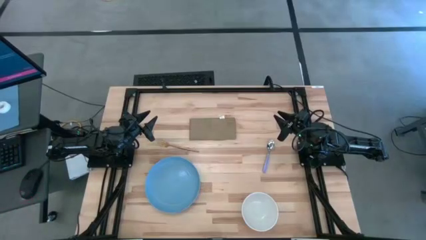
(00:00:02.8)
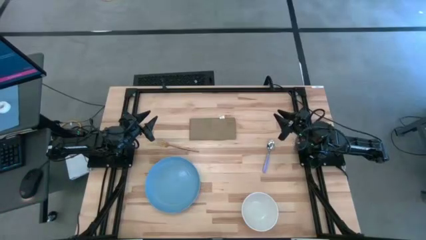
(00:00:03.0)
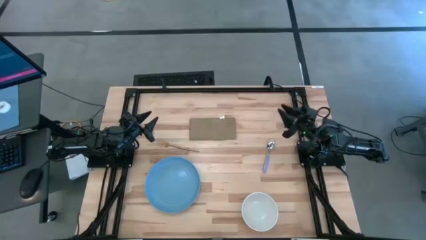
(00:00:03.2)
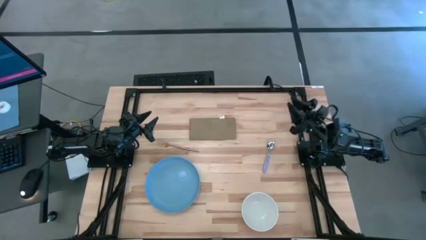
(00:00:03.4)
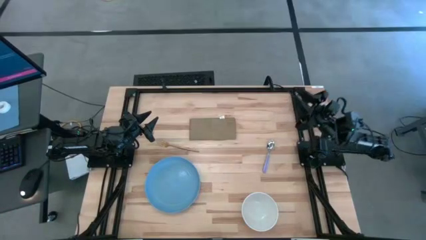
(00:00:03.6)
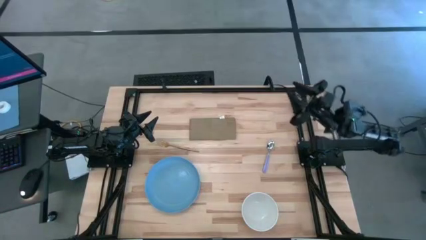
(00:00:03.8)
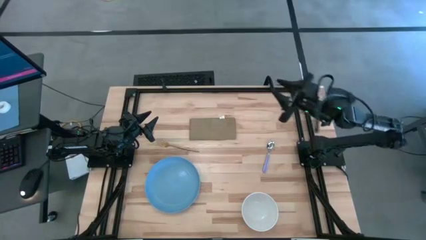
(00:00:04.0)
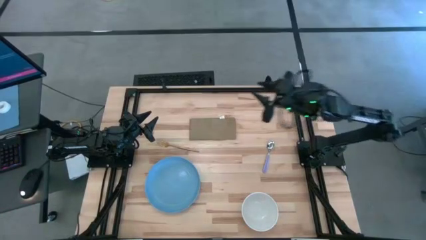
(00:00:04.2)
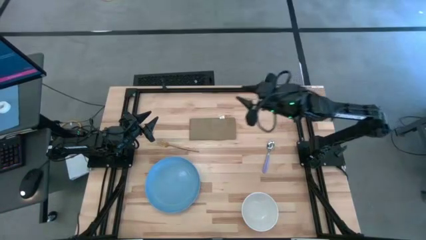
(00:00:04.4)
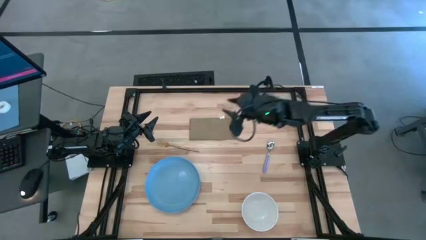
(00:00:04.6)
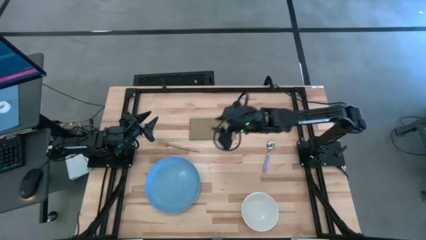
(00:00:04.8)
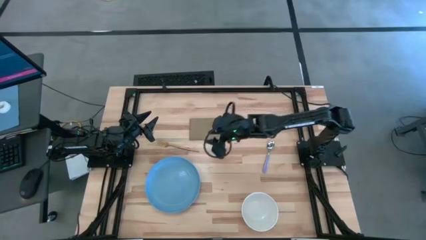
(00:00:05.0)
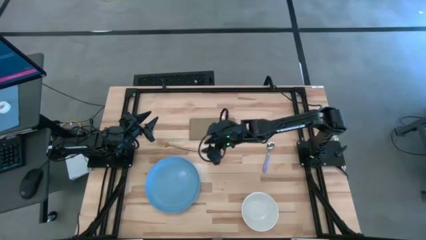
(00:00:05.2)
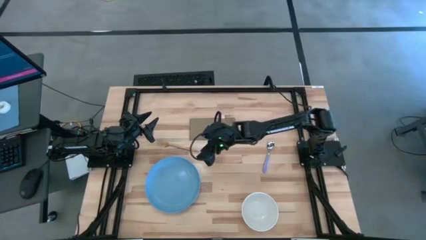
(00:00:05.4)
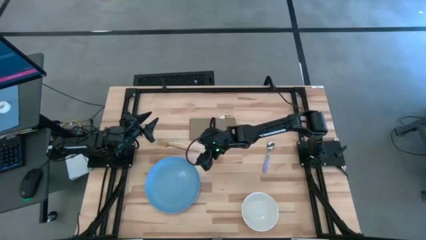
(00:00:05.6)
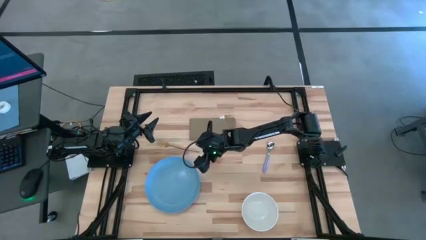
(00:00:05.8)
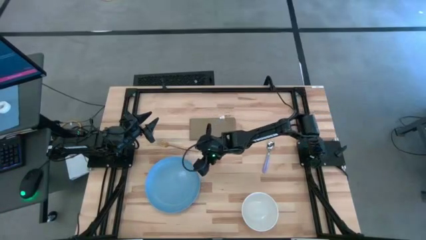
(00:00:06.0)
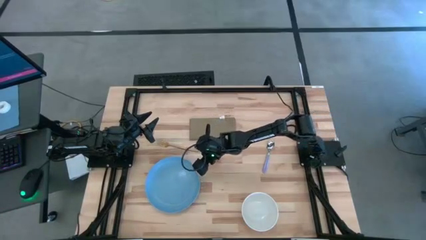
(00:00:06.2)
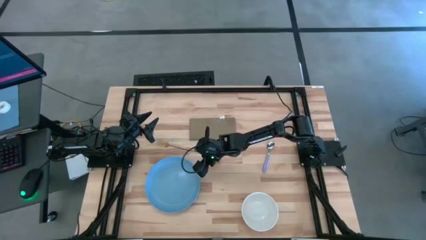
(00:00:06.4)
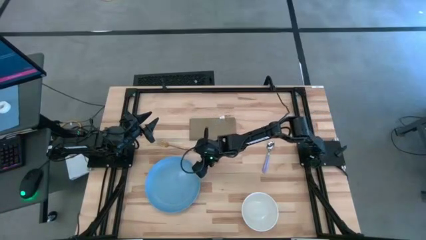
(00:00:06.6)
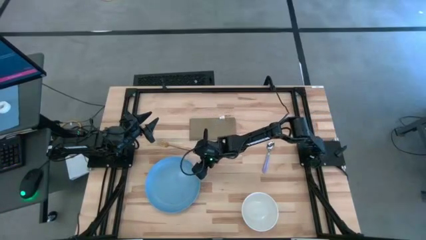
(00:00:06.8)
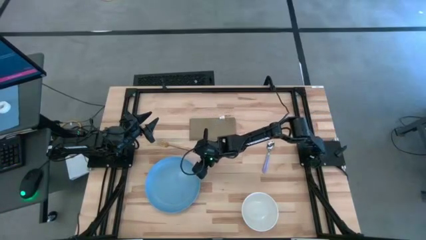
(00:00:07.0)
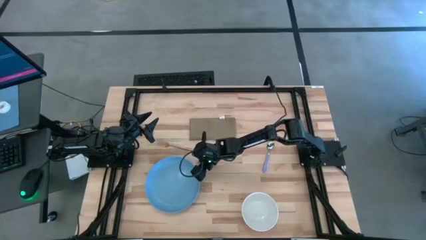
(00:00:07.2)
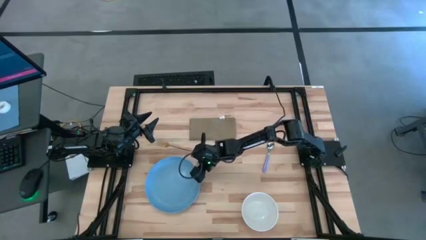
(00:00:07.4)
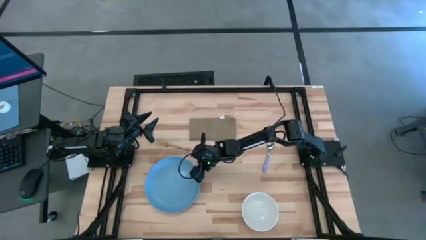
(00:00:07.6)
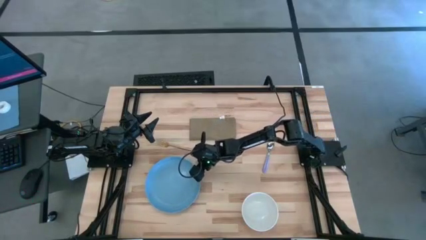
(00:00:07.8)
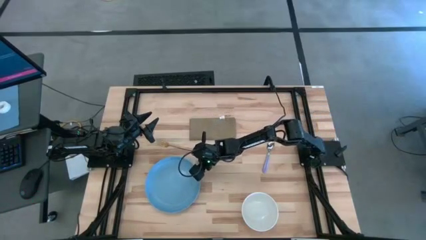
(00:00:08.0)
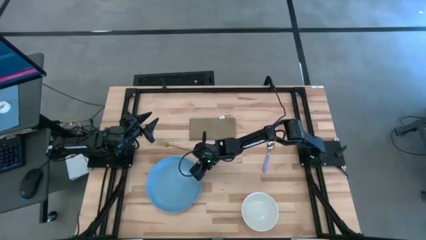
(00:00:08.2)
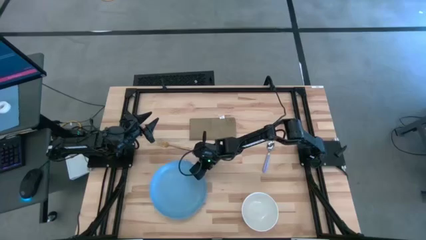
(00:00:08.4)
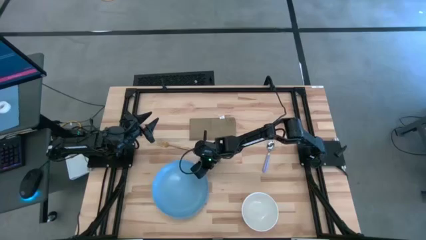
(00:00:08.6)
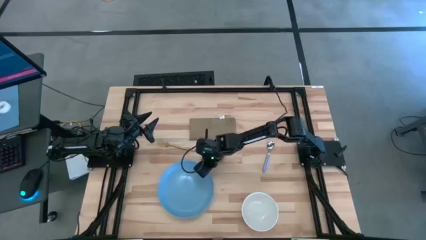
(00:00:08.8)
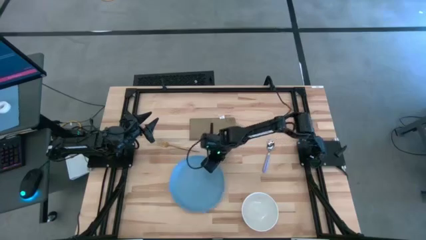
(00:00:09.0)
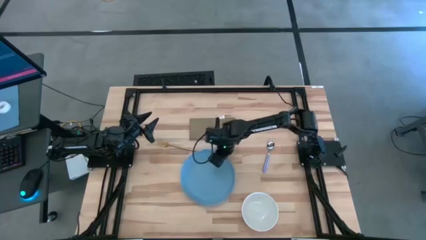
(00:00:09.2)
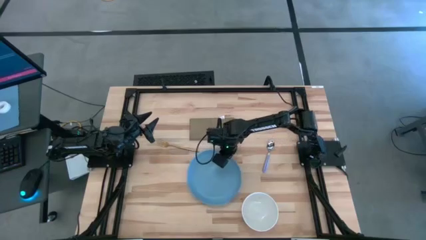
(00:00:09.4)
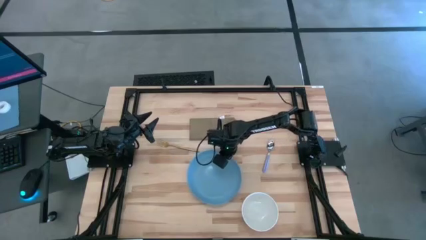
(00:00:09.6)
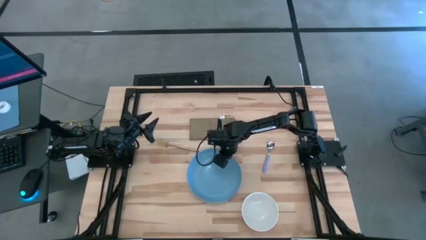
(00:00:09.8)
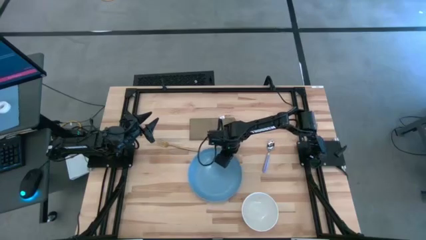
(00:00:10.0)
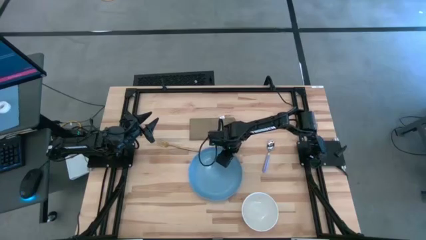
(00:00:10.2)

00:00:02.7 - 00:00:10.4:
Task: Set table place
Move the blue plate to the center of the table

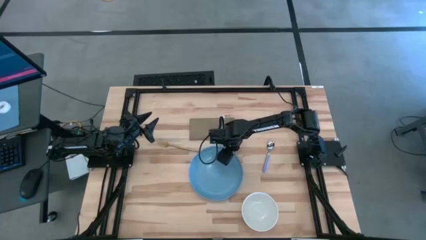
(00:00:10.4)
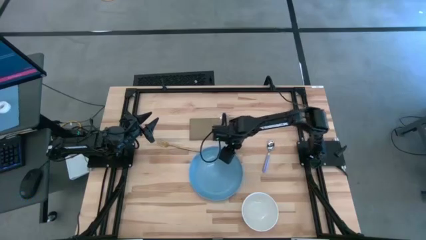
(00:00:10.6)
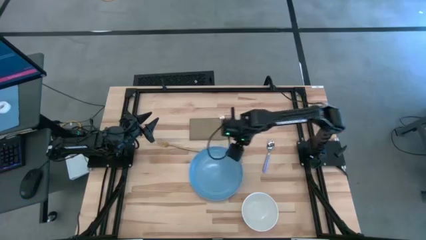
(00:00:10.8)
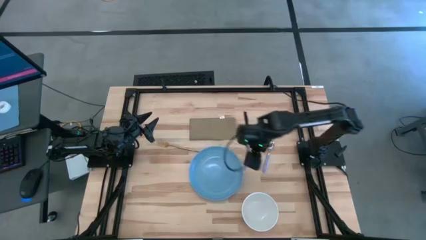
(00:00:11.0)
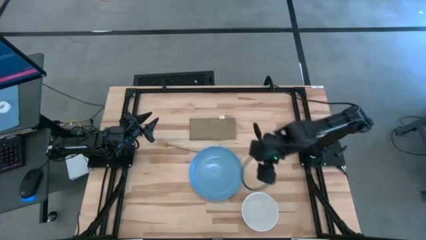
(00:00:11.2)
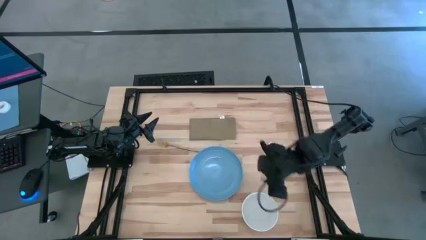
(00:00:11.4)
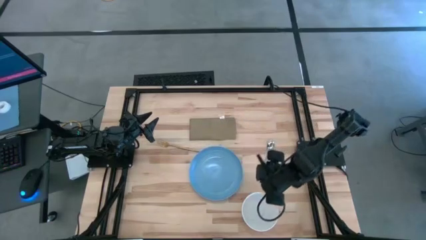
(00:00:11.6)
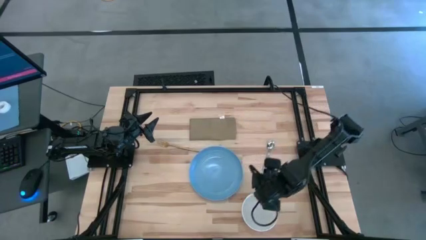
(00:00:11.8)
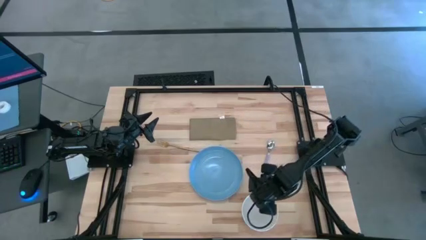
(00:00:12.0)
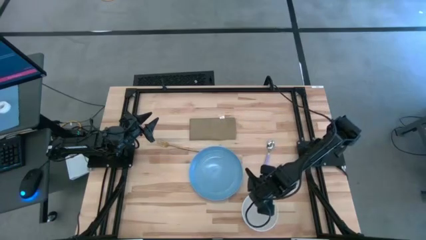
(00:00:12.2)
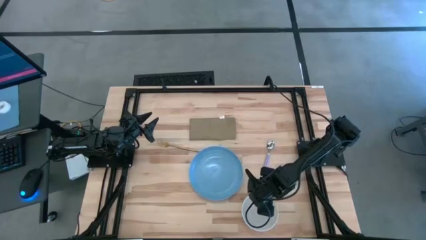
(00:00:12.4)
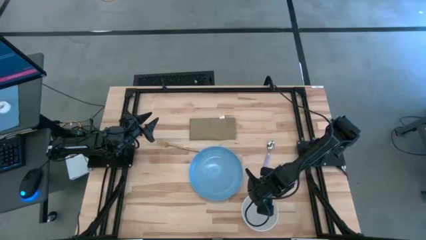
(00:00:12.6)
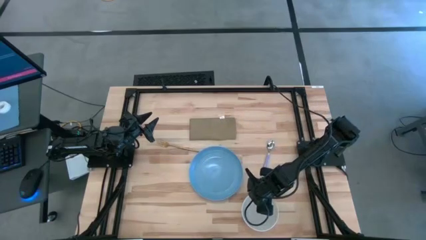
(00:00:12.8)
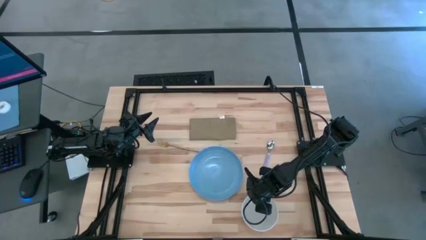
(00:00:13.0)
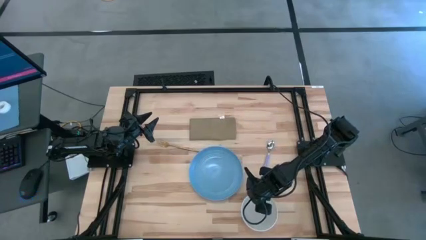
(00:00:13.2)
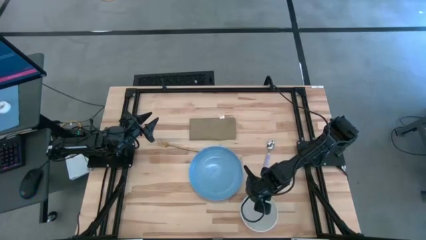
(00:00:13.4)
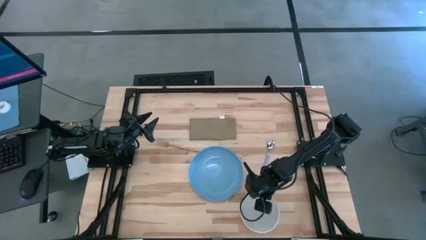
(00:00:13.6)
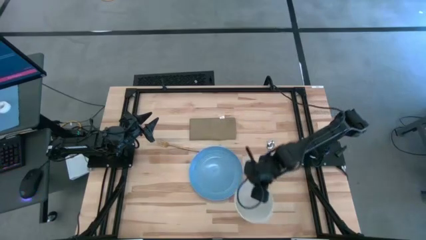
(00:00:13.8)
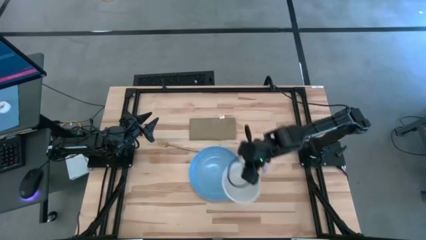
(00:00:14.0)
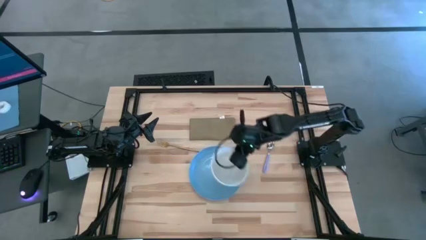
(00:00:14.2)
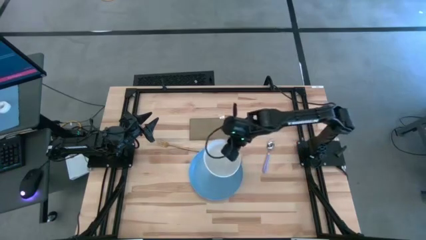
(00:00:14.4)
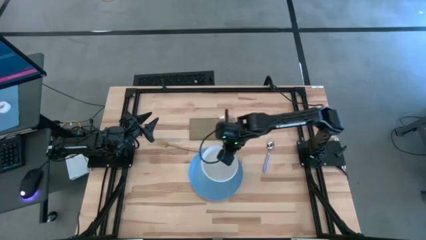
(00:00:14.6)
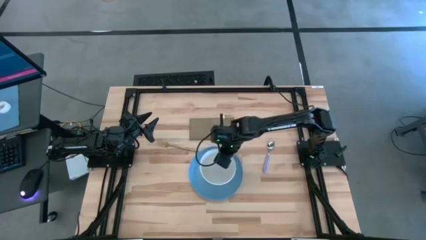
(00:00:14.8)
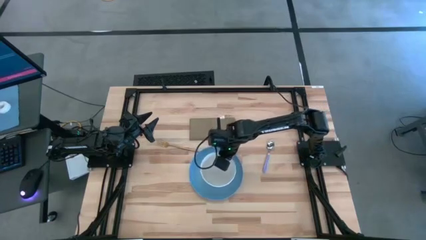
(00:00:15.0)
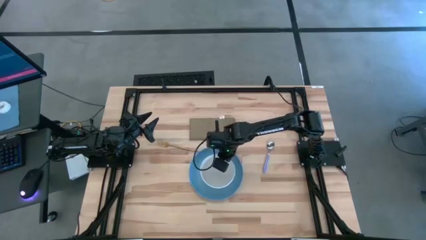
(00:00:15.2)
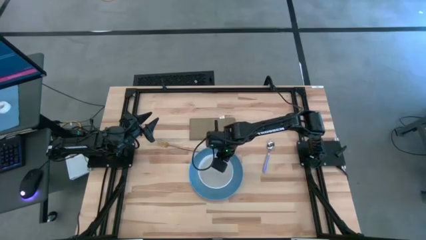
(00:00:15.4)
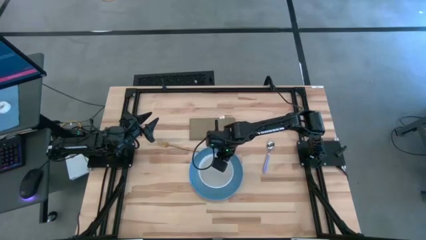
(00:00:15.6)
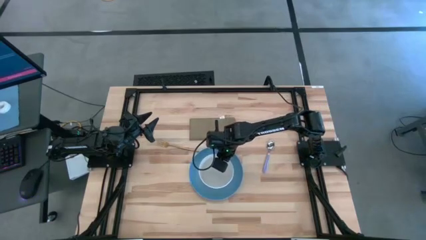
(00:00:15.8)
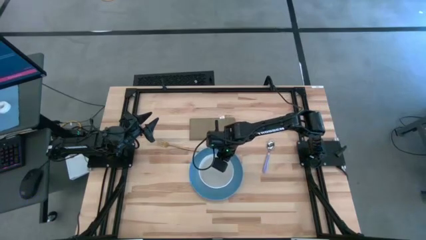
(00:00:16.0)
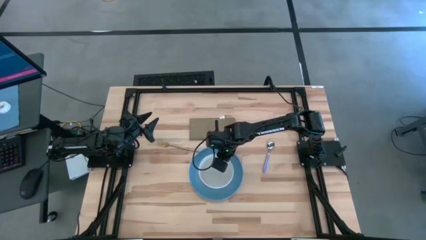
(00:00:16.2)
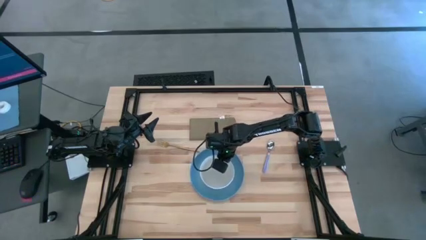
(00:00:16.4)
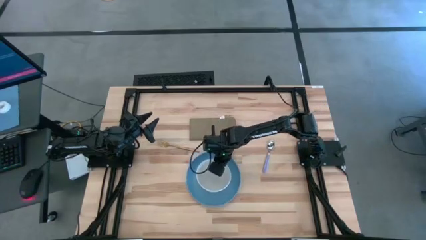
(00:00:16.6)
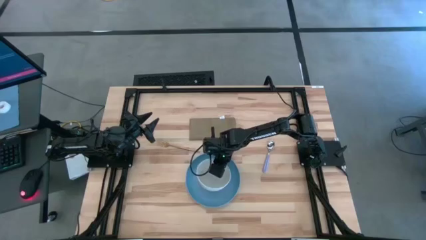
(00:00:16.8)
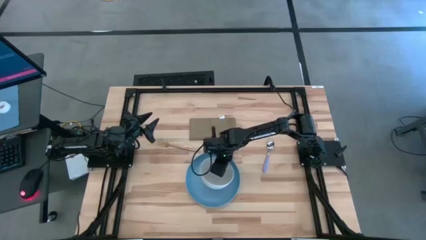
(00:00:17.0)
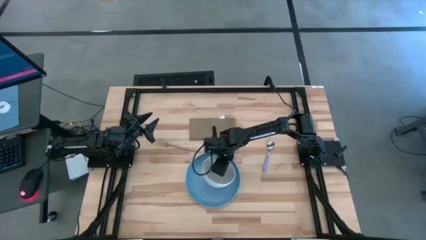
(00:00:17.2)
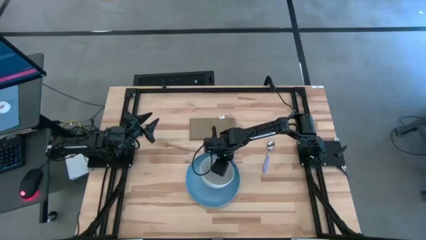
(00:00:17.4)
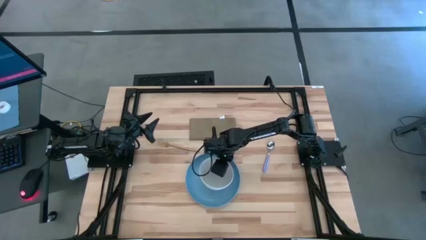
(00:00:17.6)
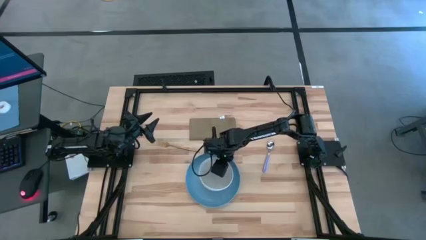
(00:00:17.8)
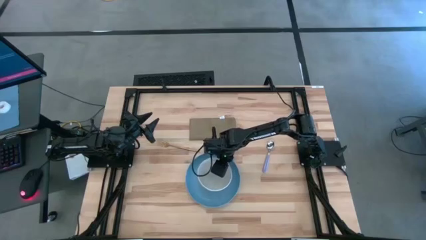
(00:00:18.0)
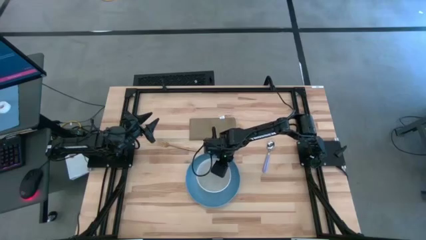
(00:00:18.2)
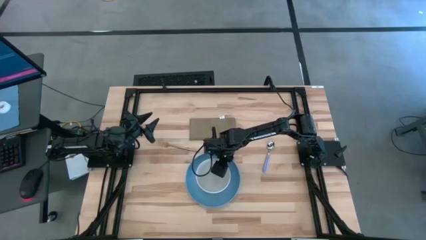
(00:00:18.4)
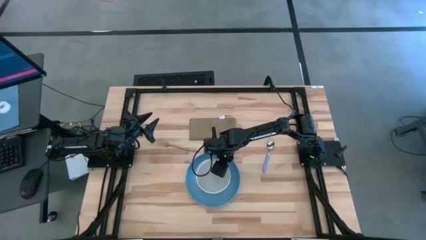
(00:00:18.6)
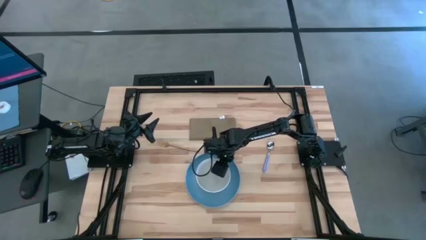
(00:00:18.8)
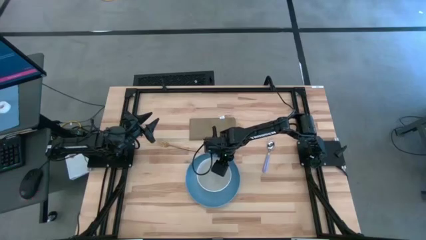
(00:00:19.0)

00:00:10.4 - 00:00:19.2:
Put the white bowl on the blue plate

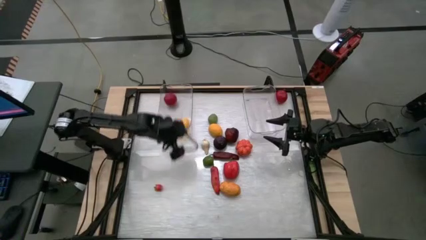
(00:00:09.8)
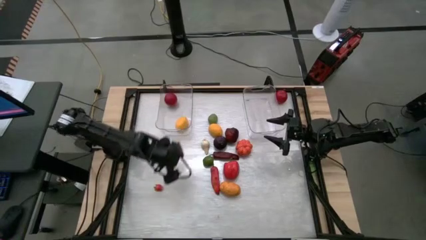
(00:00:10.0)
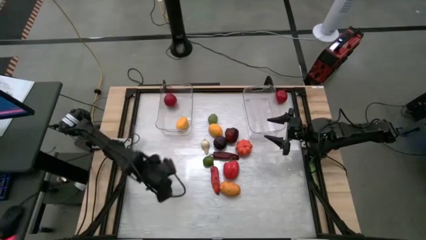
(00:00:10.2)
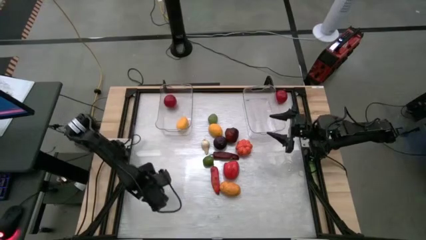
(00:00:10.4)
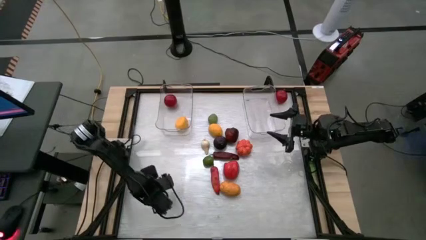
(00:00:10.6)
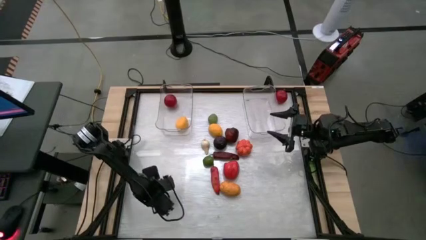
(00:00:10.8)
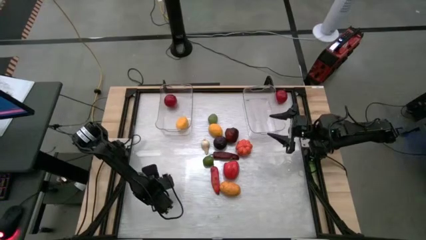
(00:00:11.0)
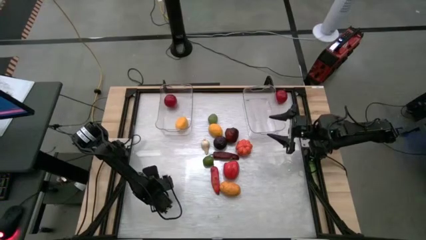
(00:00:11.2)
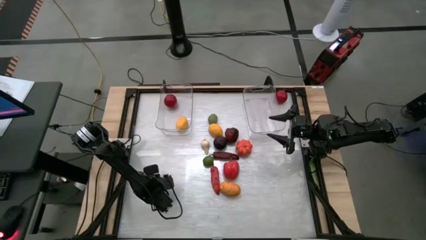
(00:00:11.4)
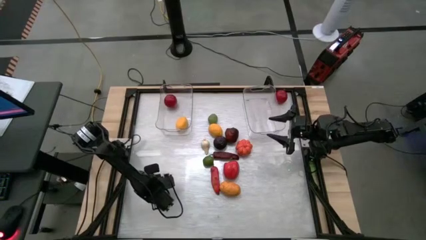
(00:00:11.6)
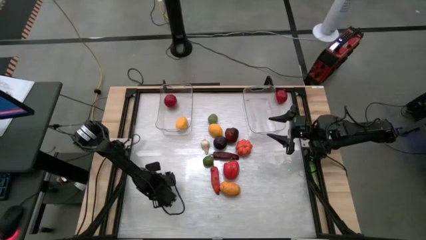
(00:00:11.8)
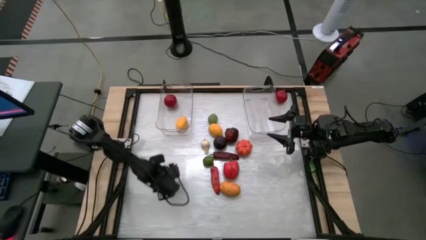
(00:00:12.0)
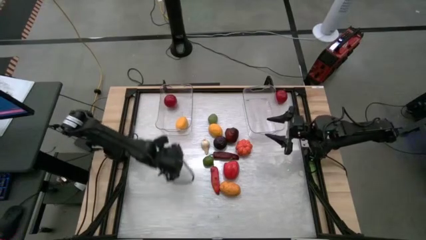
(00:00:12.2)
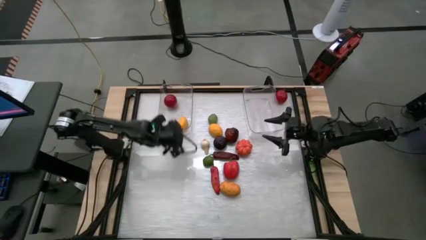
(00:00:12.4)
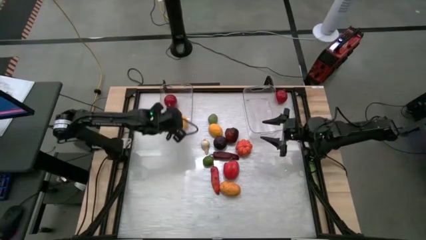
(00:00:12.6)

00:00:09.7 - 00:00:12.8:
Task: Sort produce into baskets
Put the strawberry into the left transparent bin
